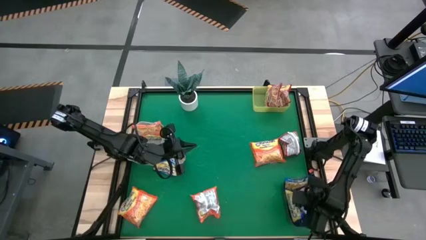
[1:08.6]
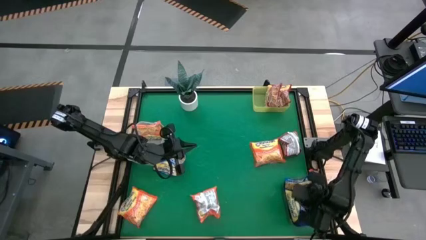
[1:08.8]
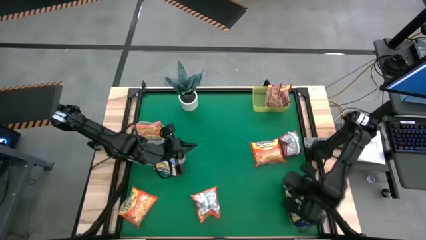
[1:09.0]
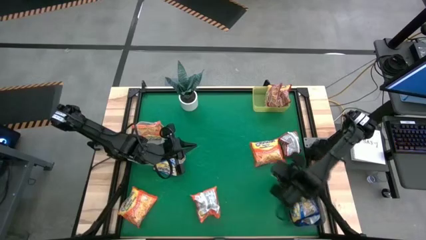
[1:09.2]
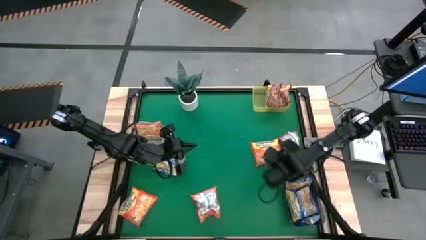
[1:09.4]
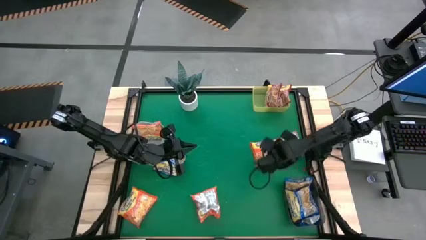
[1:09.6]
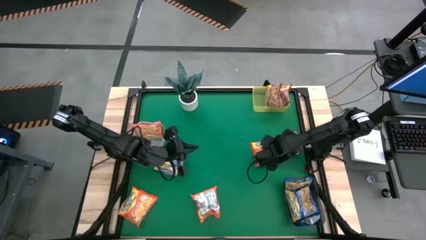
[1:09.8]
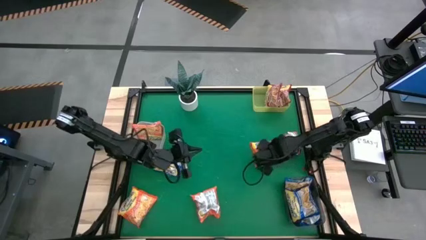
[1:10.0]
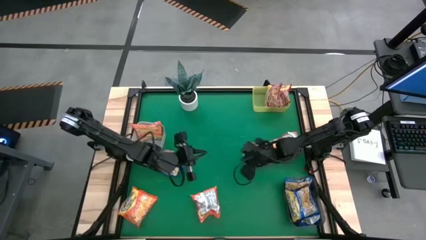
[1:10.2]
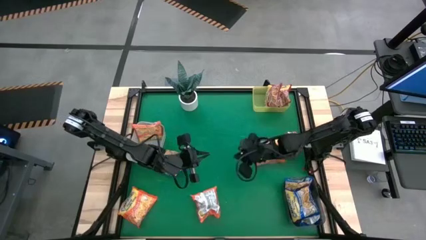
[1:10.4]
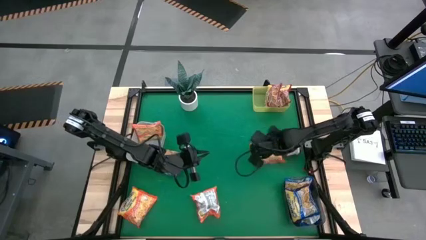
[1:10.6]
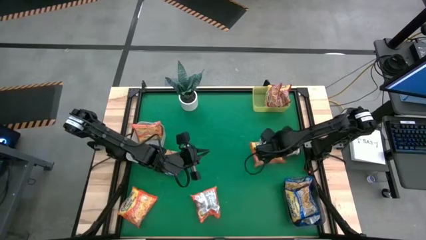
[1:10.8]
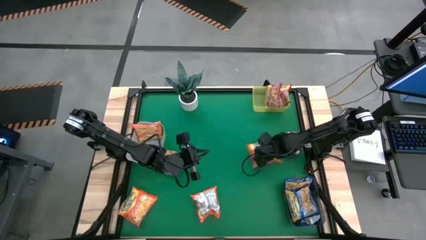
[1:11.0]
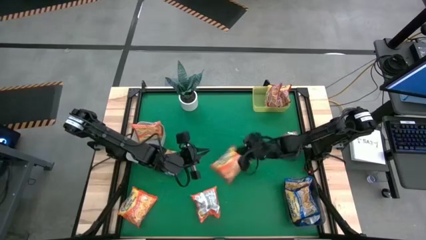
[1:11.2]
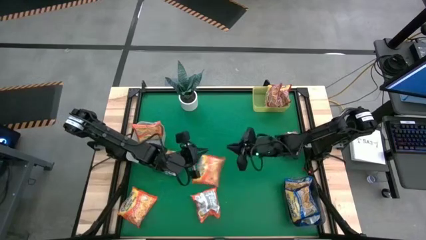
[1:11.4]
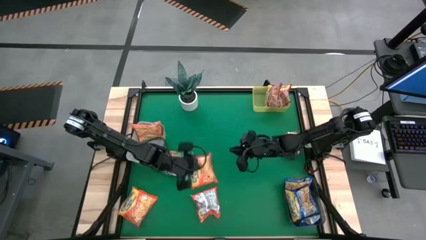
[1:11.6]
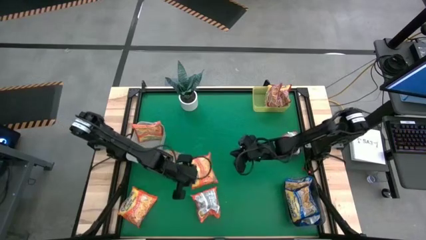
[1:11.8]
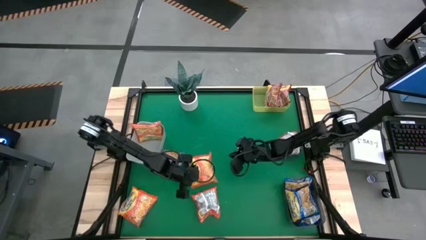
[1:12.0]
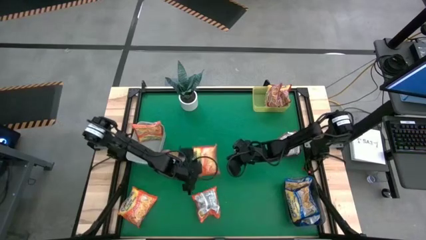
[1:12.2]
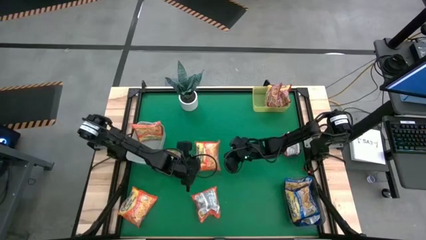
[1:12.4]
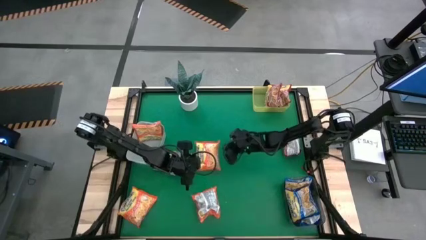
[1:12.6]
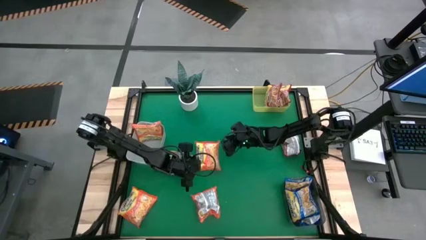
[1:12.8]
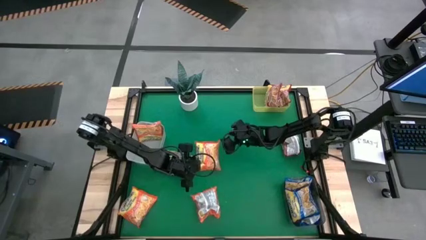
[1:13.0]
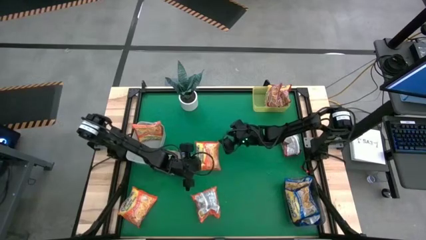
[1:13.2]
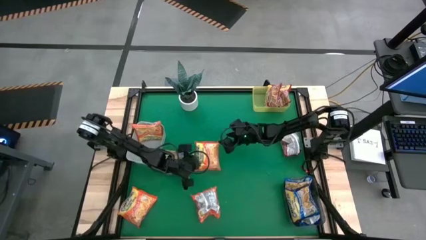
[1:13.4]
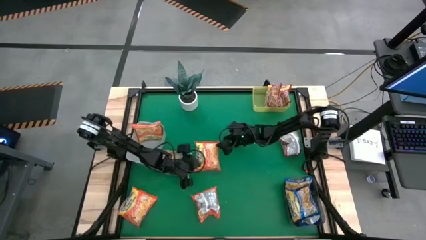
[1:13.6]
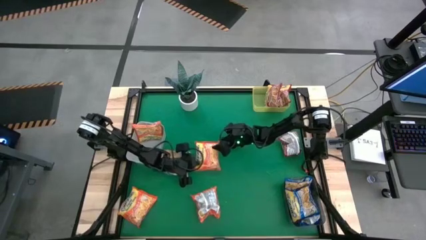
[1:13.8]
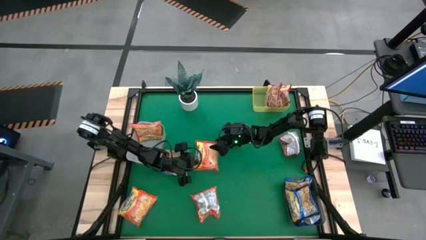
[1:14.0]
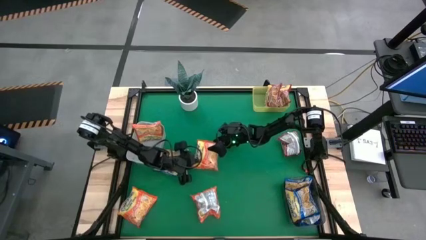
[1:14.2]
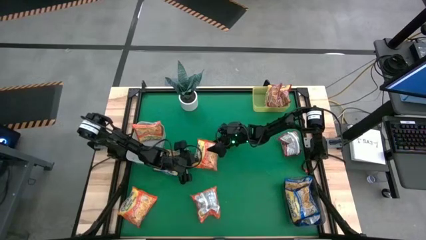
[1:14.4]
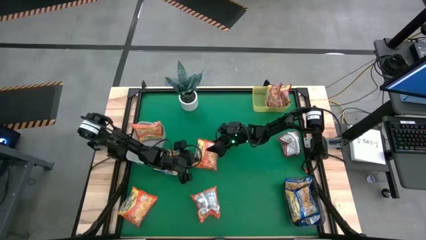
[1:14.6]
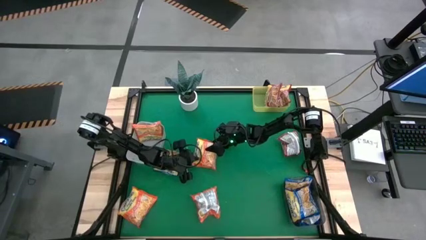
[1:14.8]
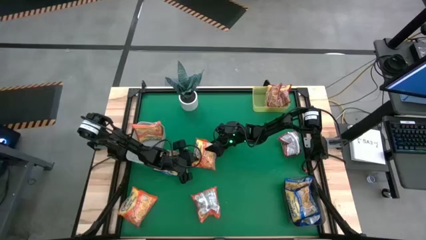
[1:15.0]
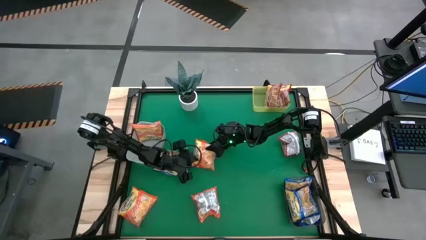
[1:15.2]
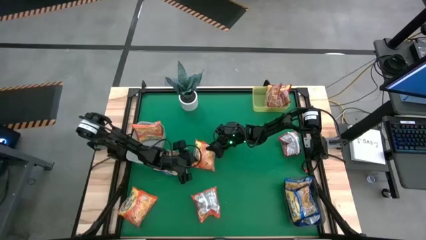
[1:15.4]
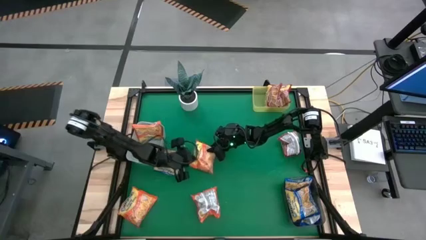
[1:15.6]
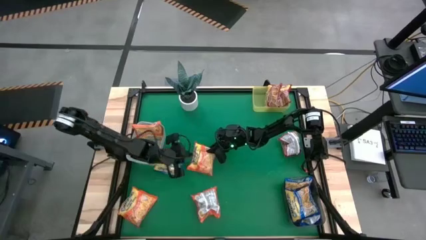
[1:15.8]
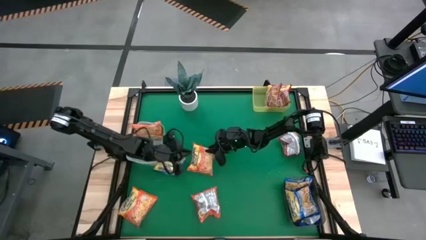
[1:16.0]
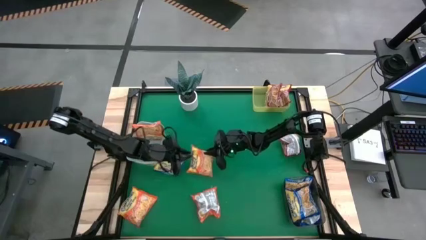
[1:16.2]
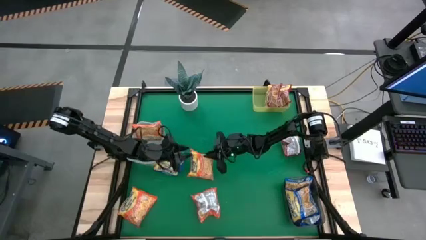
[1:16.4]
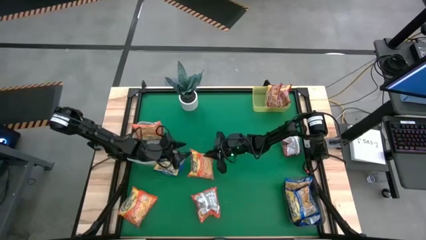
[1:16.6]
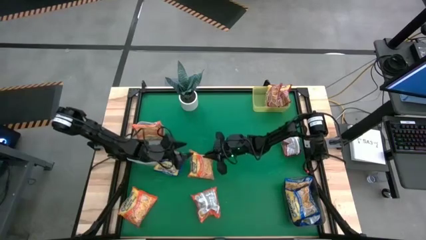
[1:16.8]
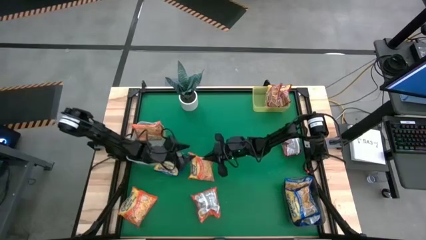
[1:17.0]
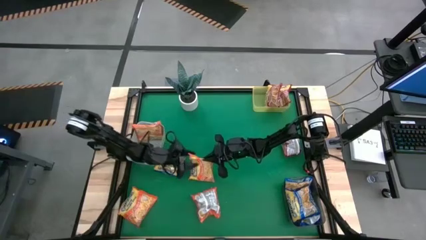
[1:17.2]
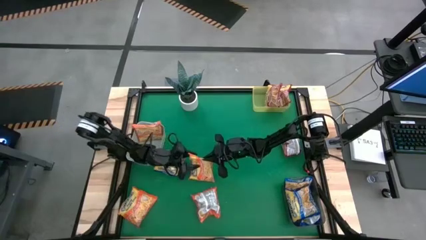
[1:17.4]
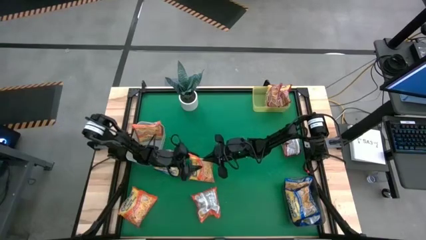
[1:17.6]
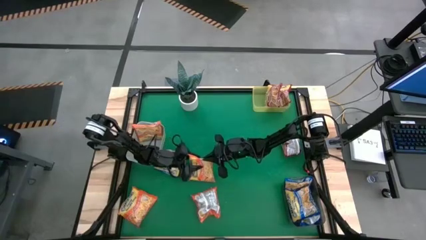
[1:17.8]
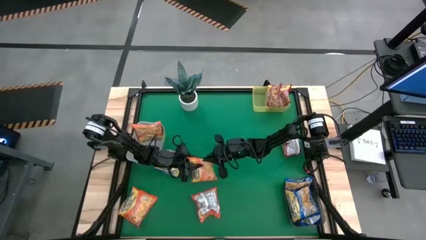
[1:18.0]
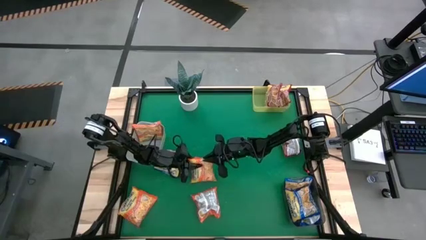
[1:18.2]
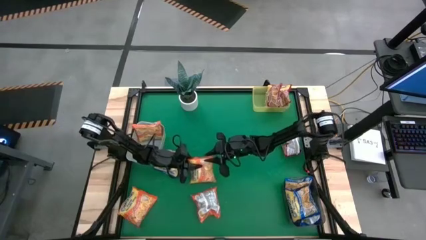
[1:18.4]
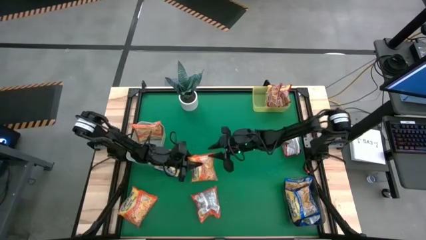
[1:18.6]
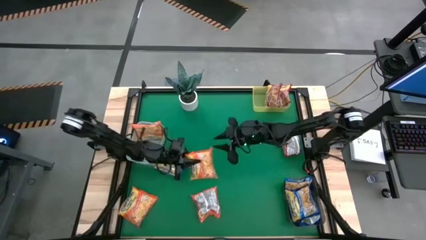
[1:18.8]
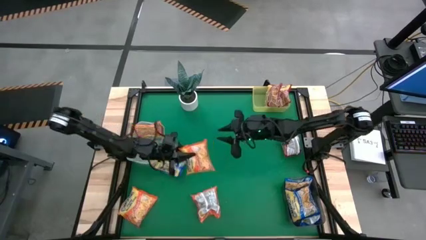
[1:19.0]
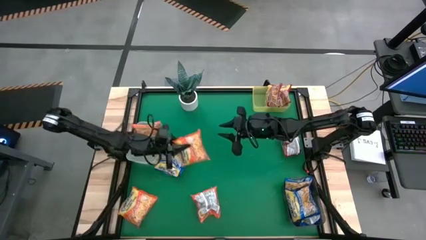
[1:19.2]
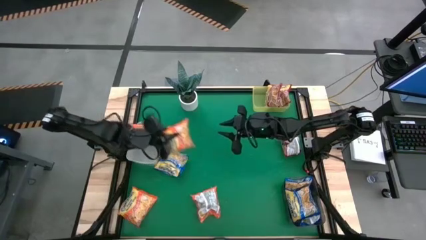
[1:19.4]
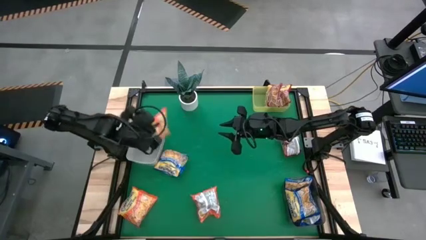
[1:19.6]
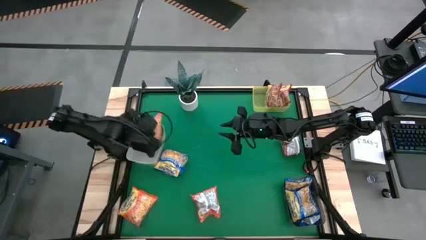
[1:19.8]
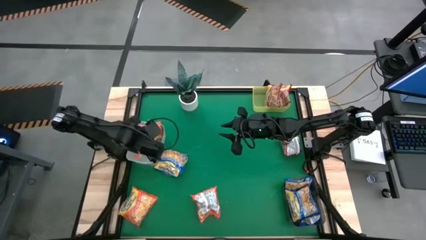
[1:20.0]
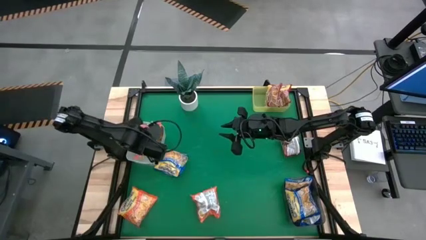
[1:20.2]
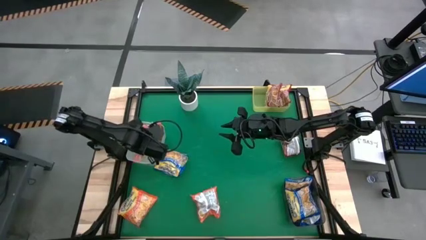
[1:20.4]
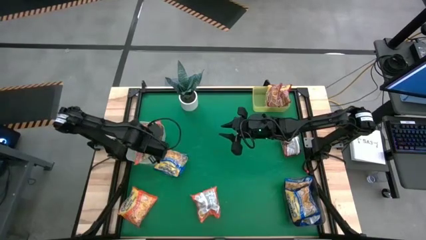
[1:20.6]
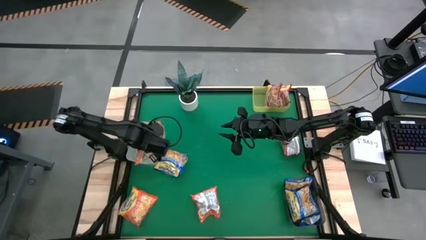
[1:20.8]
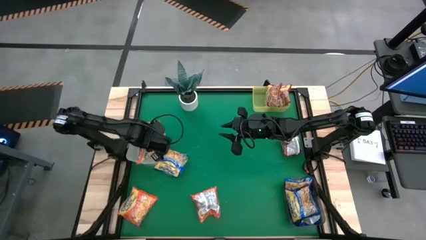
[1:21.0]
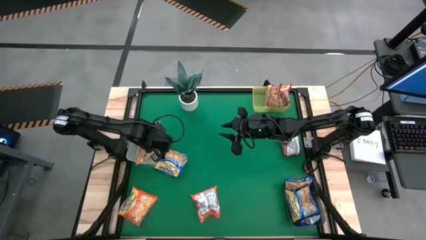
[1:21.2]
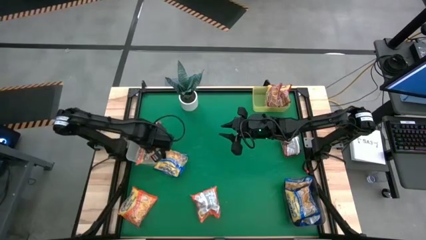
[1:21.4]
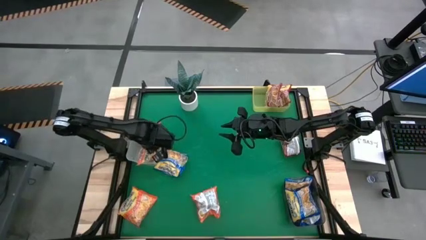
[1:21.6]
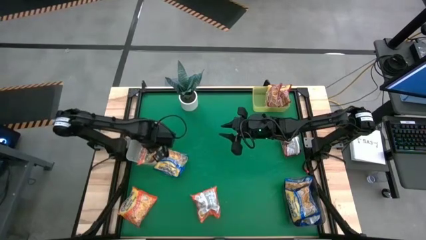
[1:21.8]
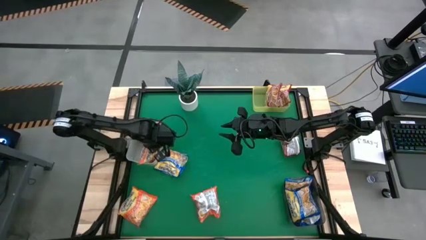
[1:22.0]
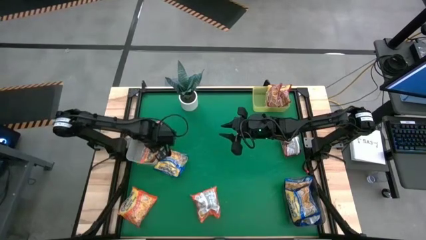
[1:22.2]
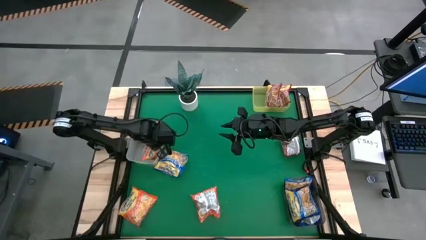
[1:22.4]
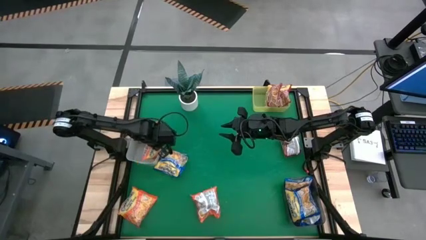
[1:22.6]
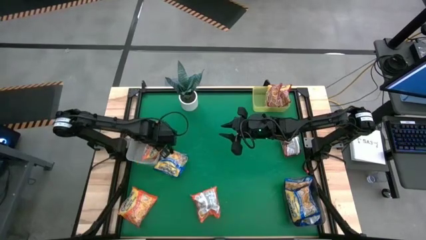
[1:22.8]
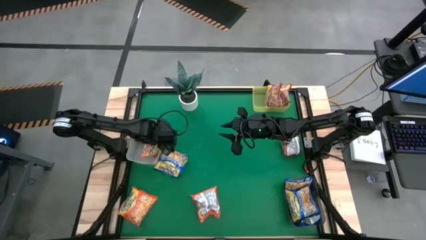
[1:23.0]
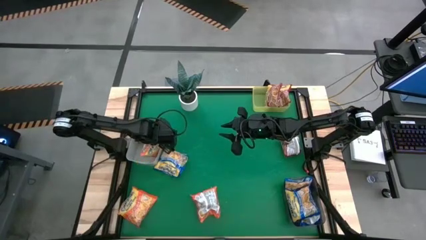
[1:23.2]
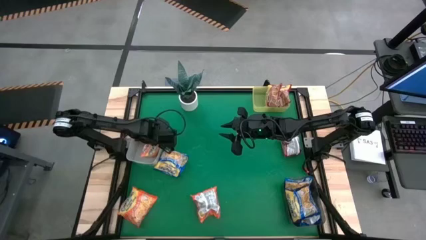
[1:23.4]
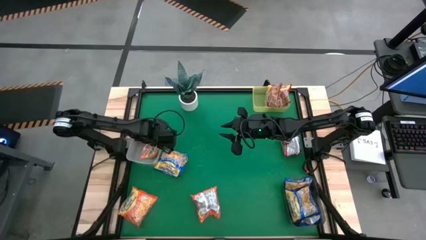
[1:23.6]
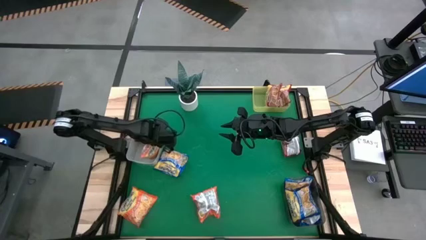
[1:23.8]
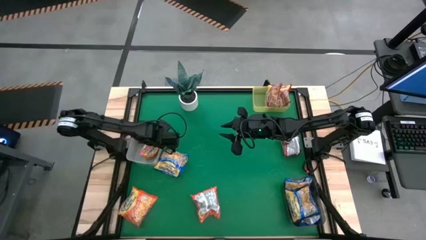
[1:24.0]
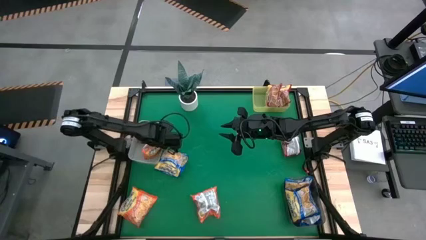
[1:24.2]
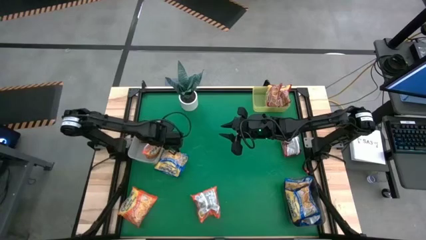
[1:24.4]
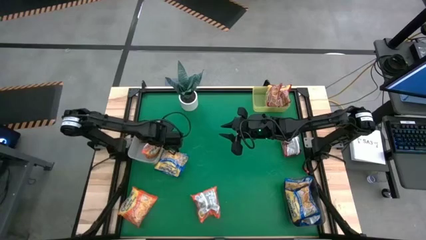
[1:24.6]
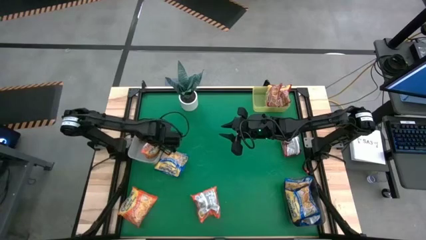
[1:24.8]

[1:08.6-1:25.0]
Task: Sort Maruchan noodles
Put the orange noodle pack into the white bin

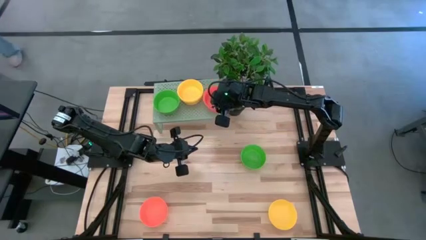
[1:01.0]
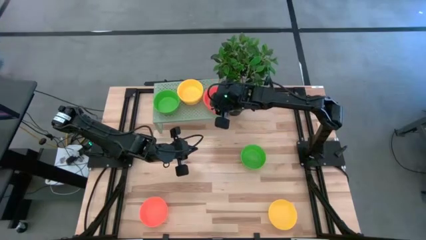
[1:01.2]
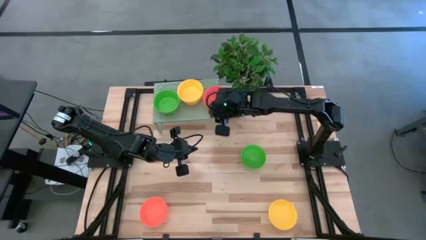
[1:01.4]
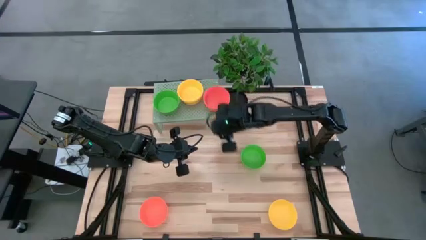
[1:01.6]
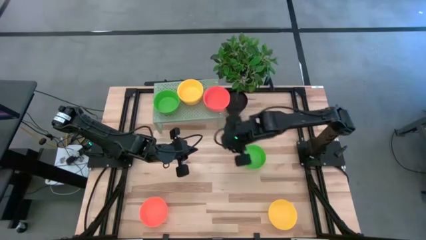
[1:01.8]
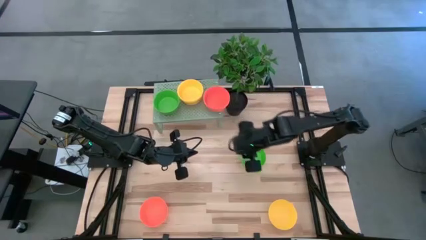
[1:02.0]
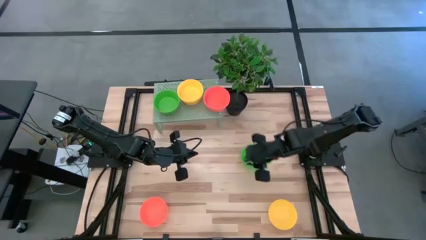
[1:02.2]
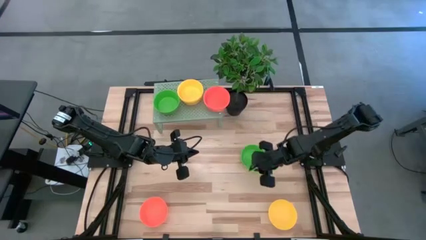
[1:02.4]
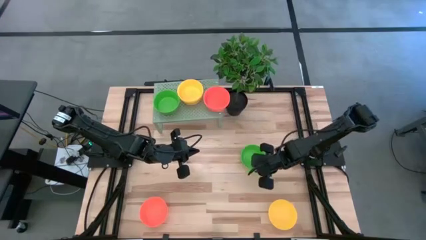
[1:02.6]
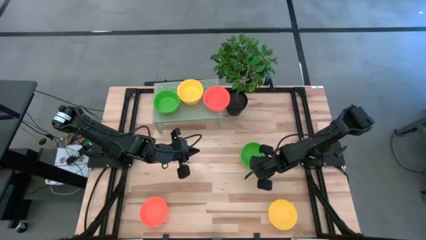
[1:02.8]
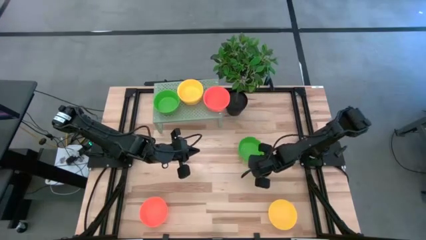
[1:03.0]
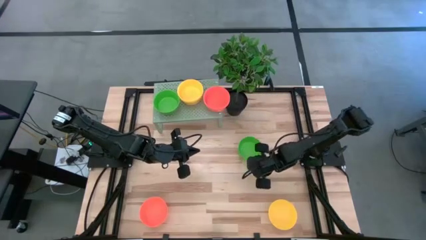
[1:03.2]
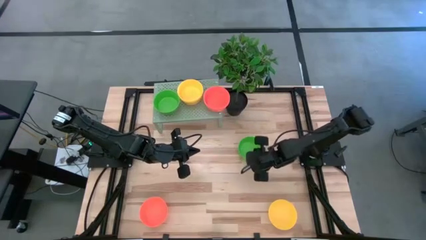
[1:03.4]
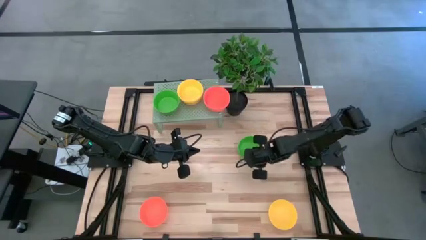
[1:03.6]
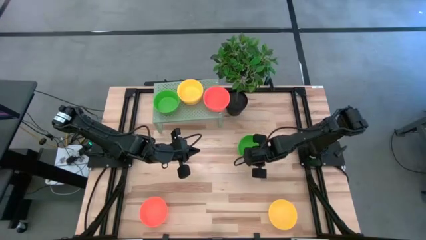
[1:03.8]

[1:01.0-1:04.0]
Task: Pick & Place Mini bowls
Stack the green bowl on top of the green bowl on the shelf
